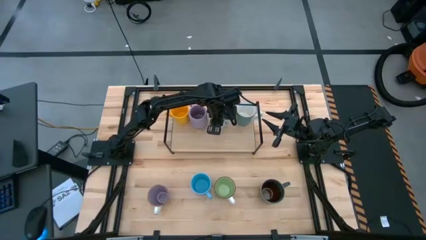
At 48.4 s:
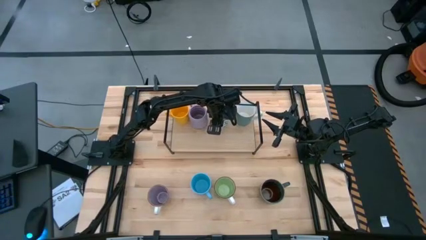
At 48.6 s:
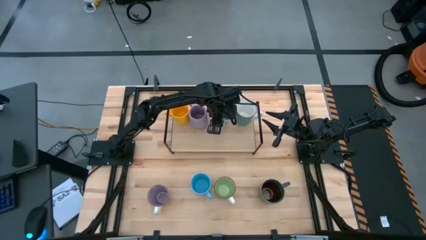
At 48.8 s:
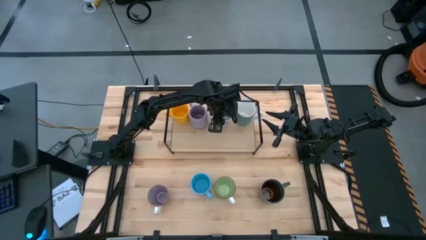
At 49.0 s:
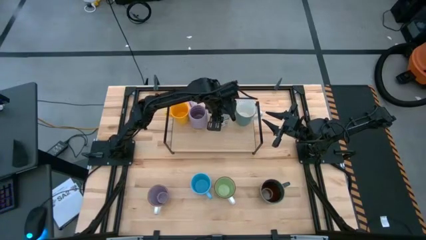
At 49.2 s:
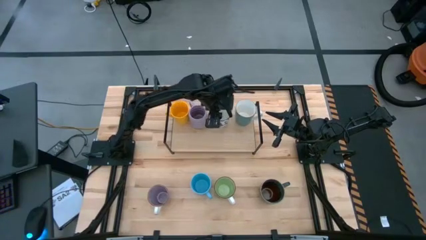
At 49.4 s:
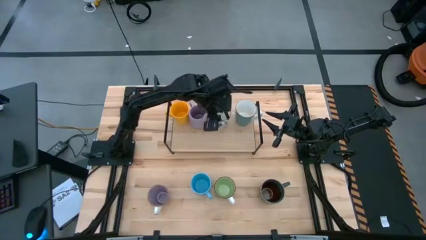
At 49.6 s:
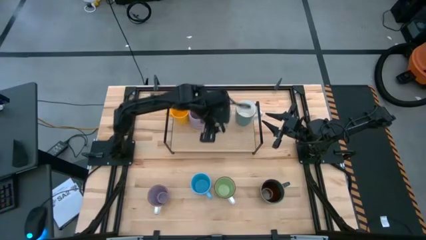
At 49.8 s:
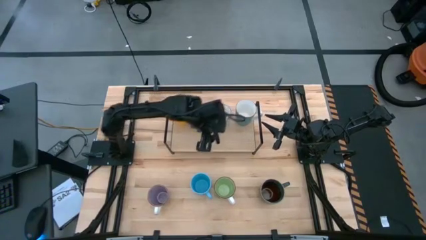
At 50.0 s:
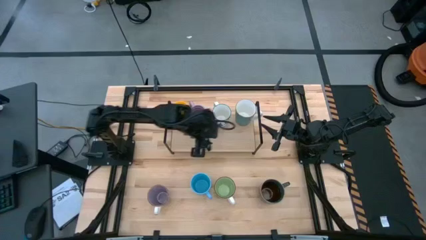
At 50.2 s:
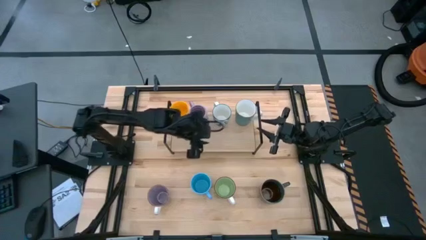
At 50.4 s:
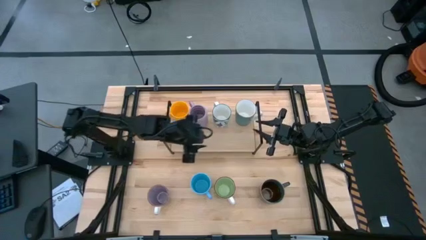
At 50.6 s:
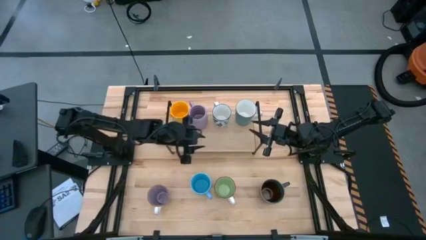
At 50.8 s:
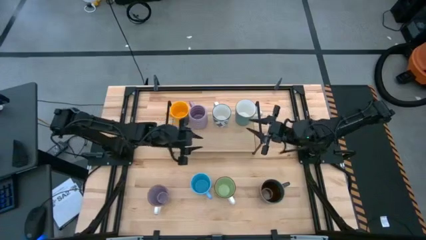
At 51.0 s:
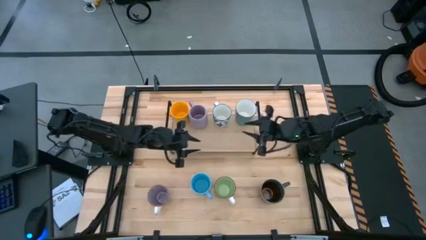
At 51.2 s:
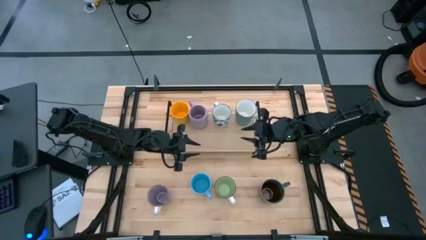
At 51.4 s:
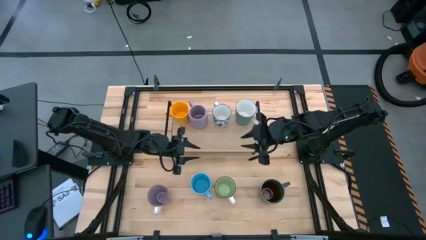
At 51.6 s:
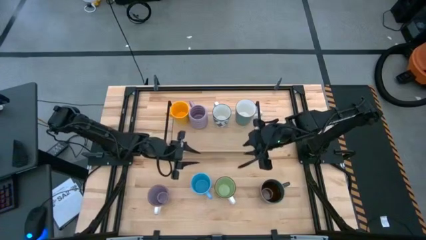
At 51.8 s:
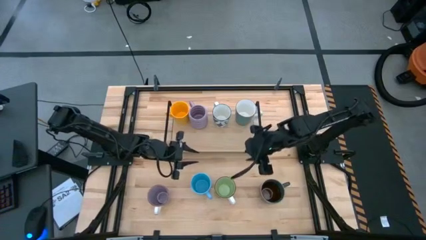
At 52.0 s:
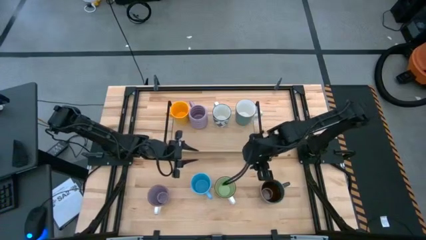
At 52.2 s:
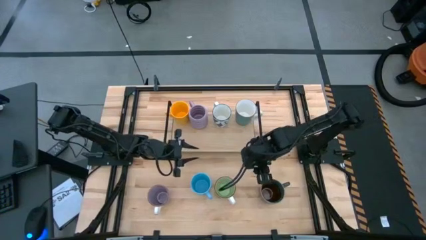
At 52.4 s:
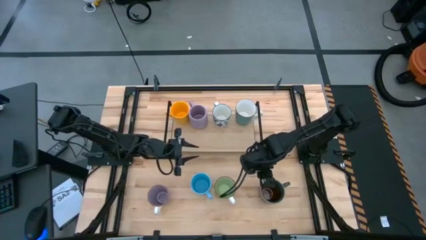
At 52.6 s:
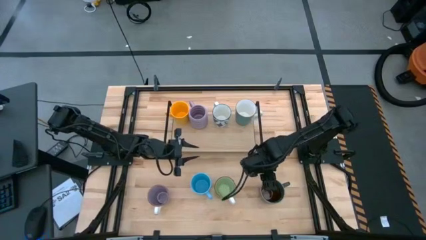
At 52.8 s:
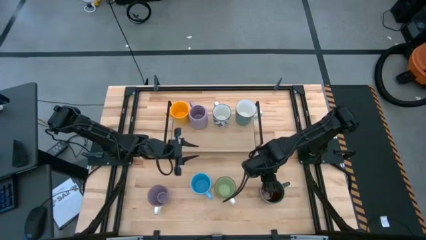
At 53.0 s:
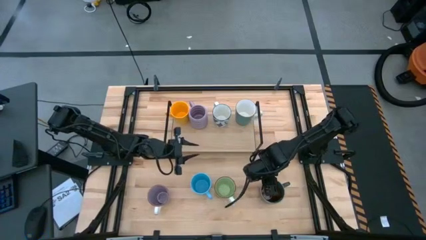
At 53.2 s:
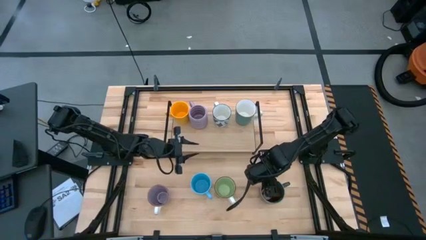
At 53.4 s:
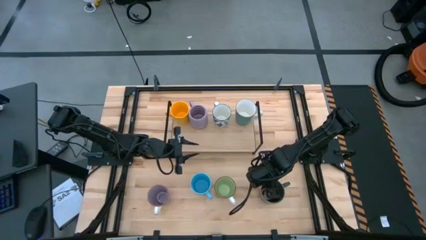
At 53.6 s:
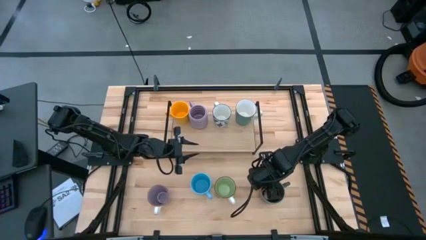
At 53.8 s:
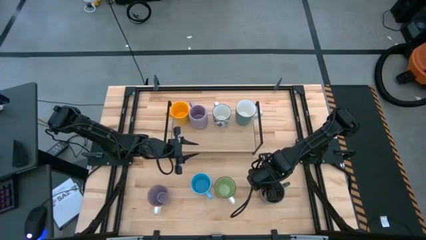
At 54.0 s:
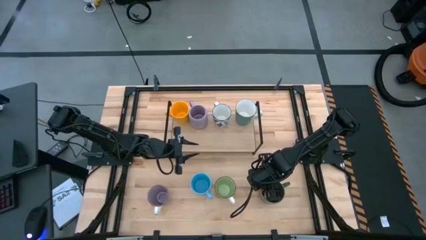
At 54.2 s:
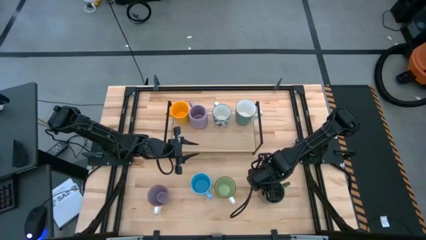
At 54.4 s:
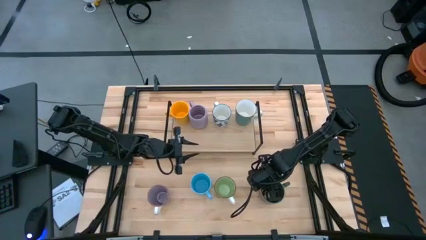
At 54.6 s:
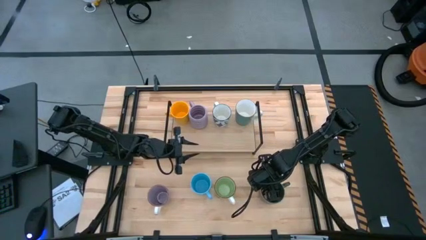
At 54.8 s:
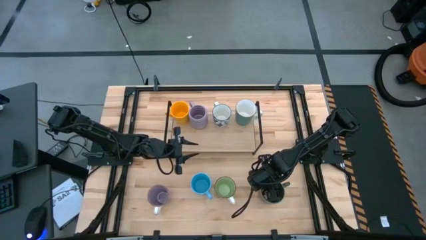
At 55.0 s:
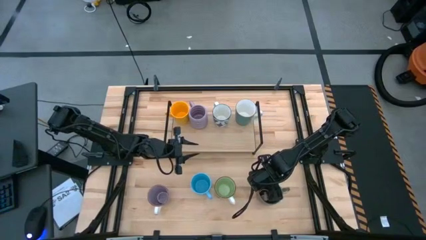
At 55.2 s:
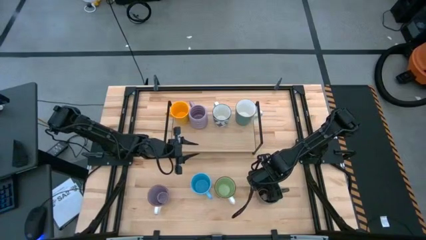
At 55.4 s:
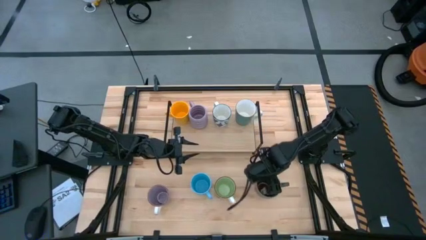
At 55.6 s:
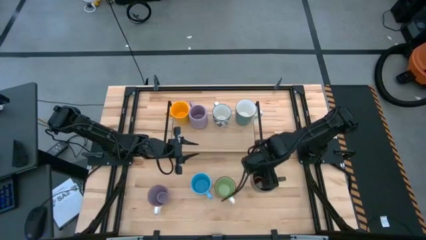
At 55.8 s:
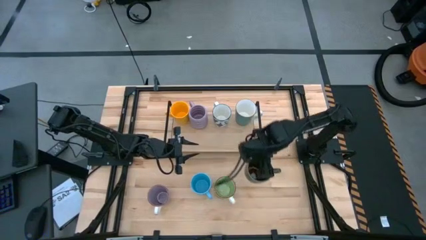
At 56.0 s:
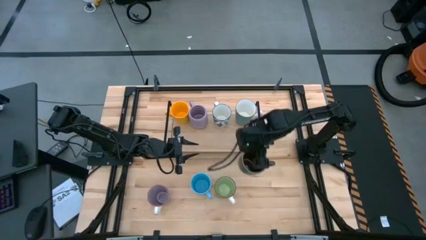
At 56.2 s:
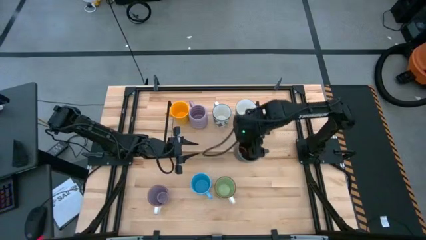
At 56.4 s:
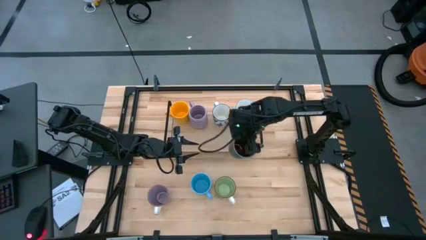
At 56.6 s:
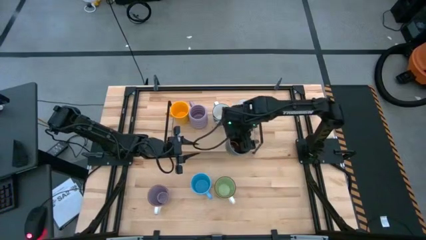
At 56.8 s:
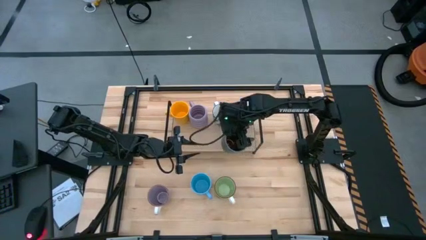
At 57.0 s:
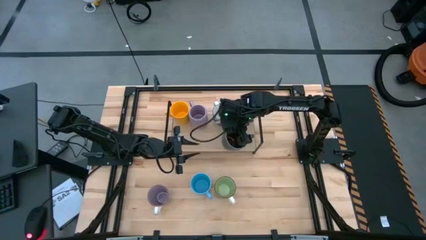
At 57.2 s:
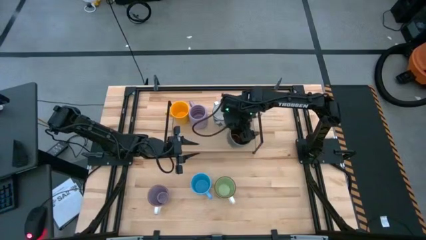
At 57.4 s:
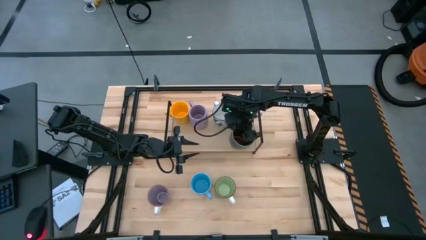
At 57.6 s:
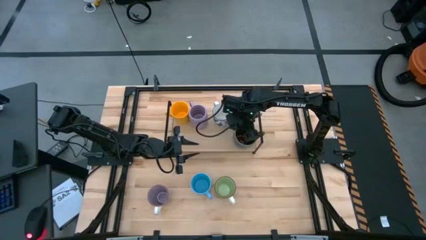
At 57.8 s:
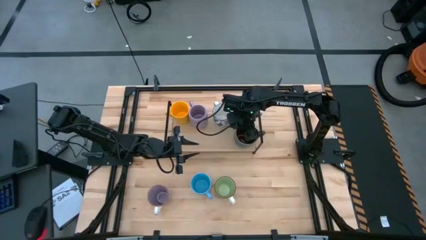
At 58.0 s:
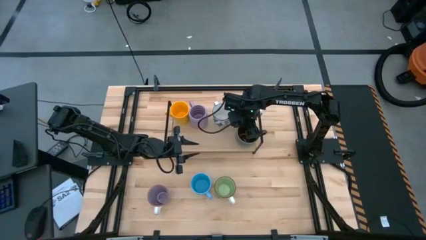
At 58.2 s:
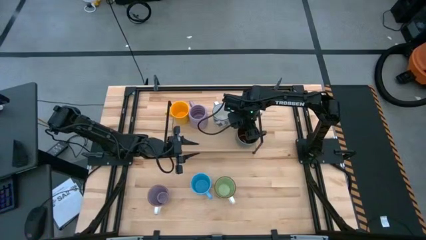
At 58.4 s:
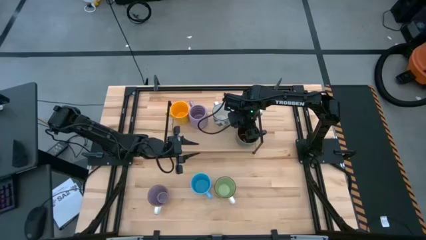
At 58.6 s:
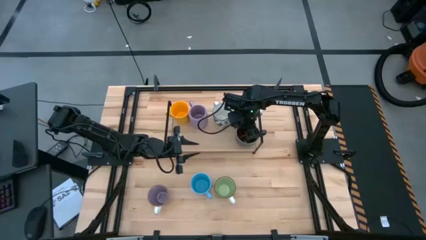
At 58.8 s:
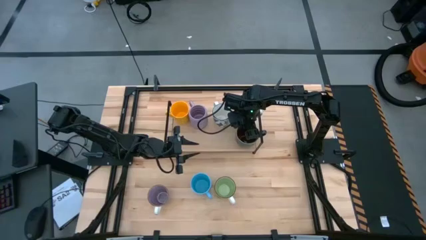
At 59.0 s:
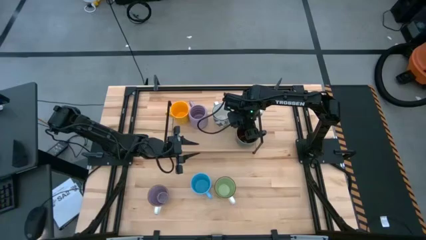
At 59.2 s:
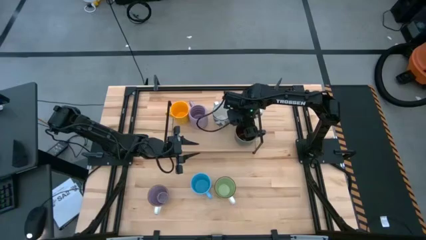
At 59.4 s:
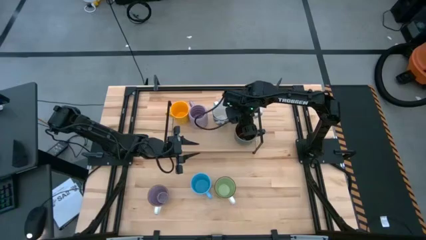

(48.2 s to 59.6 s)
Task: Place coffee mugs
Put the blue patterned mug on the shelf

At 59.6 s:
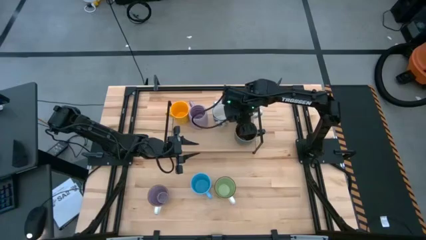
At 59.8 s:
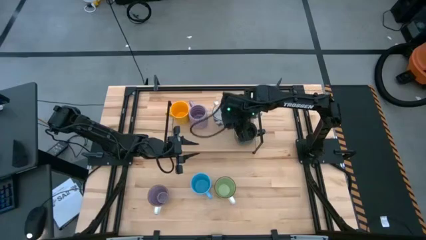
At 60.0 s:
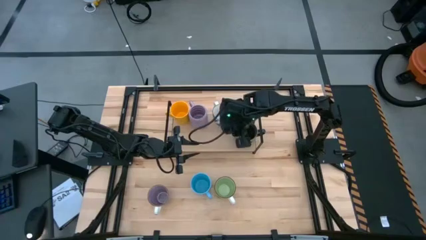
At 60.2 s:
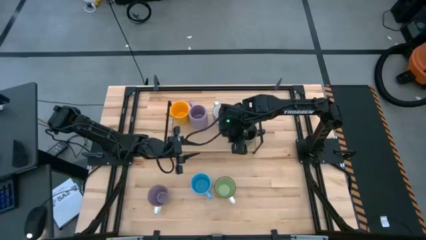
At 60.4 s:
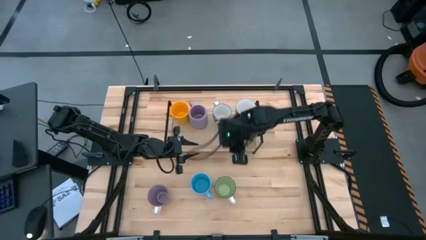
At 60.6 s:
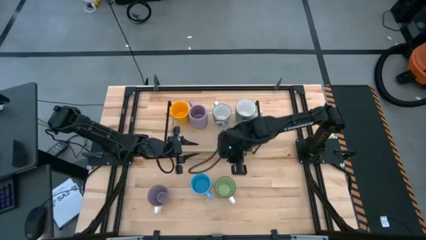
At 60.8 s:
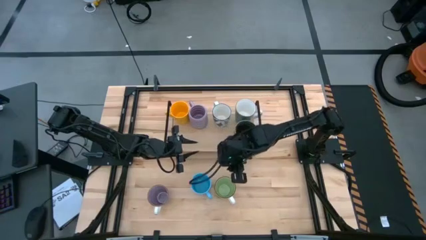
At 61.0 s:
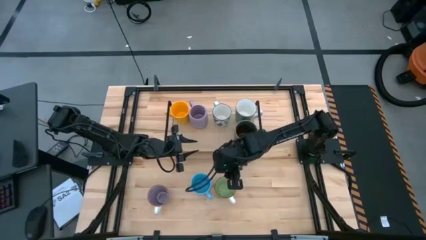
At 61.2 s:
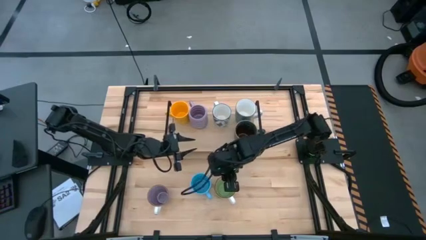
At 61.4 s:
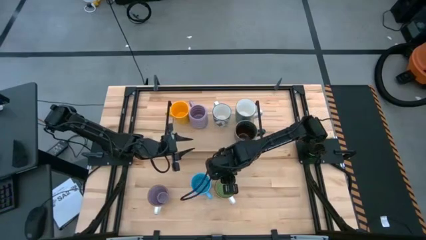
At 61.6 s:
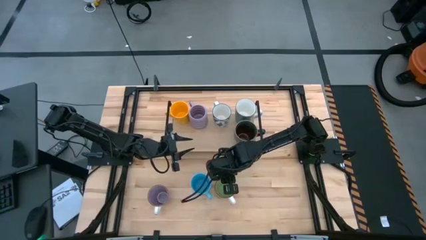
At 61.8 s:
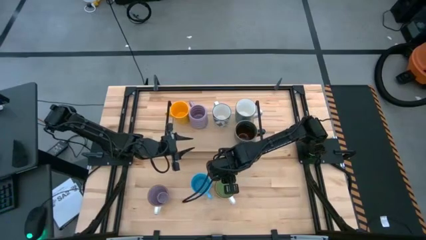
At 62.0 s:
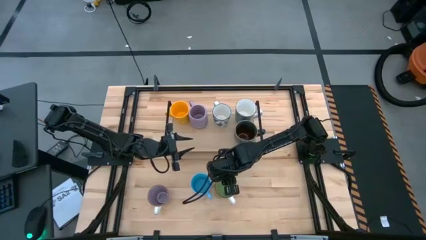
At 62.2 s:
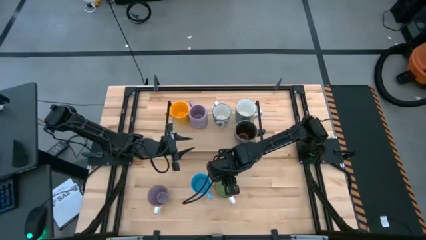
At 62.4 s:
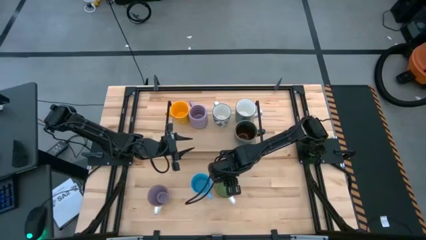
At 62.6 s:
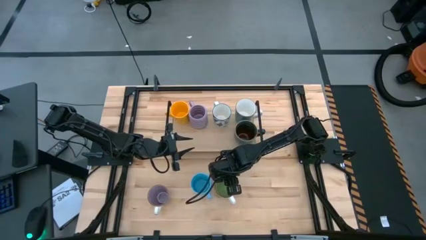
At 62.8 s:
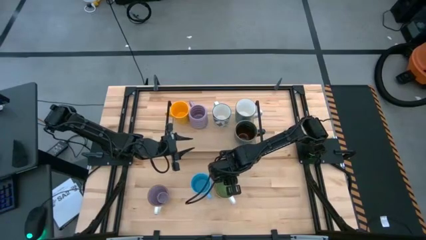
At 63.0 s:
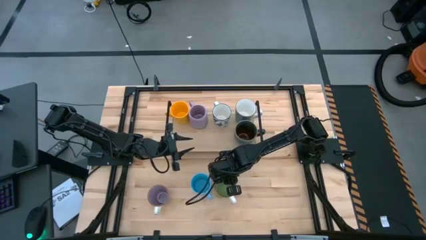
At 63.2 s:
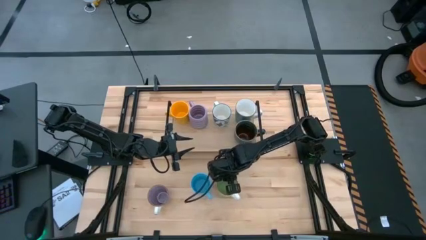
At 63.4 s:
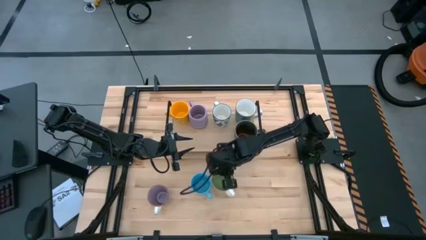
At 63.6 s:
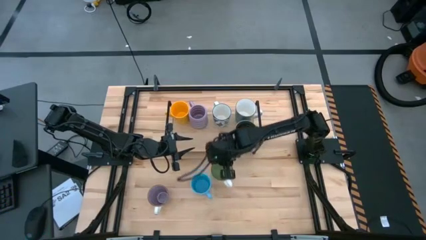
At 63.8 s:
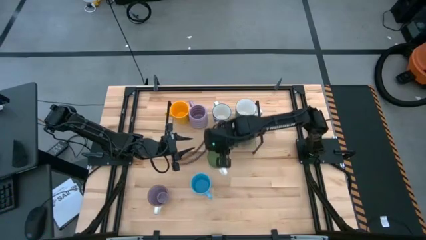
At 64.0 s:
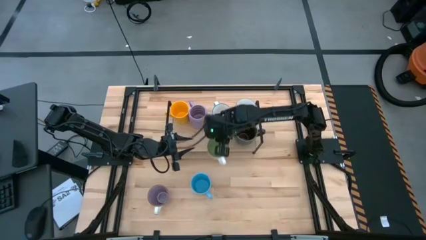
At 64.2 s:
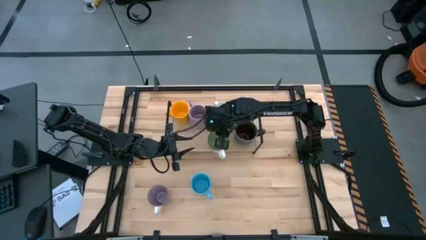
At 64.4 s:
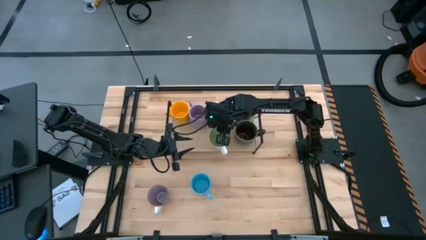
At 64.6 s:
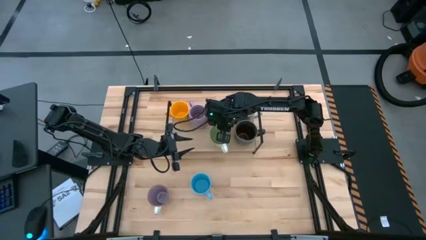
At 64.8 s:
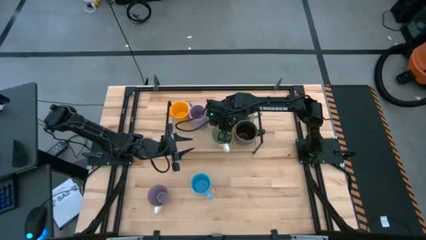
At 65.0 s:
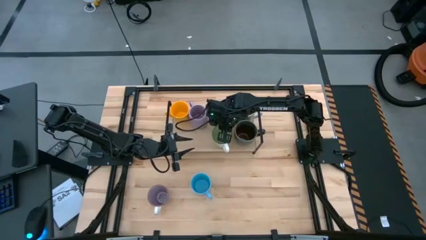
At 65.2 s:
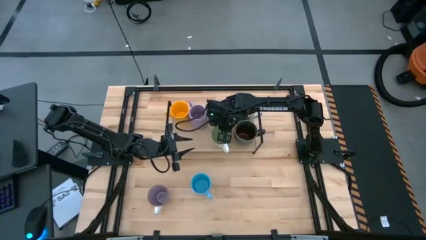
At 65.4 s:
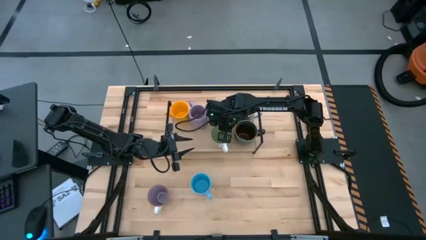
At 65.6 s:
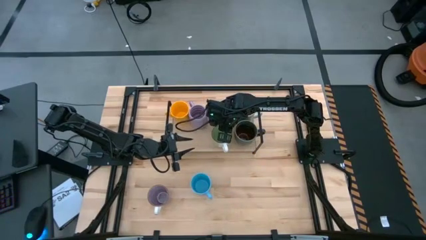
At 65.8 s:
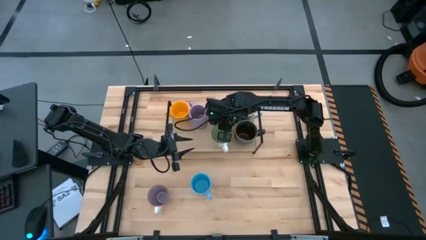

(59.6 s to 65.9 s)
Put the green mug on the shelf
